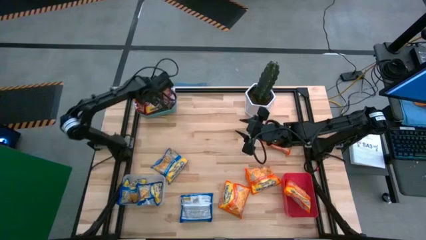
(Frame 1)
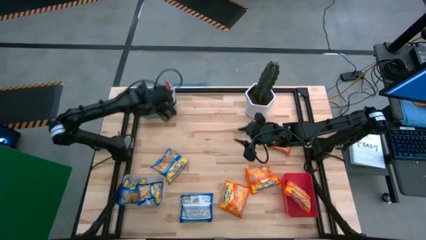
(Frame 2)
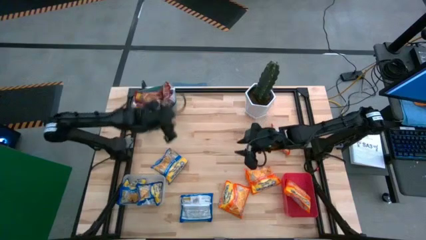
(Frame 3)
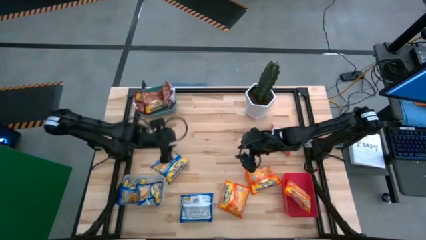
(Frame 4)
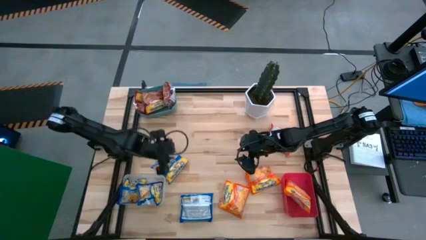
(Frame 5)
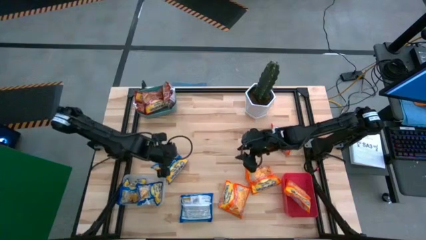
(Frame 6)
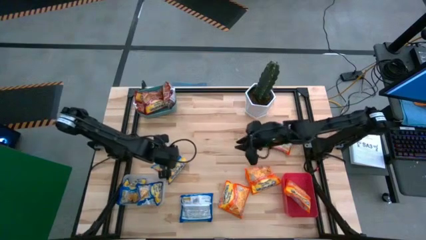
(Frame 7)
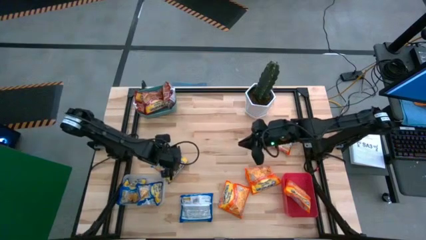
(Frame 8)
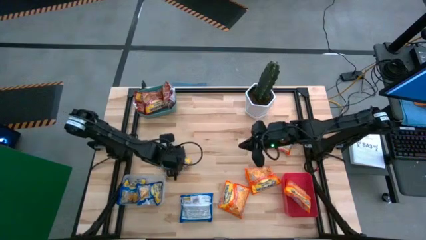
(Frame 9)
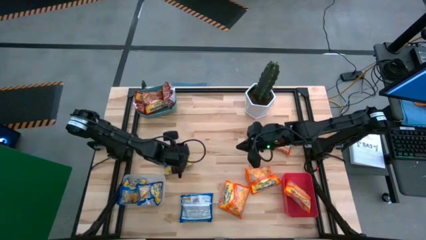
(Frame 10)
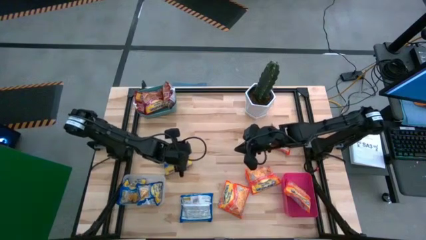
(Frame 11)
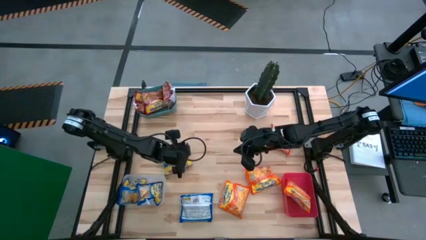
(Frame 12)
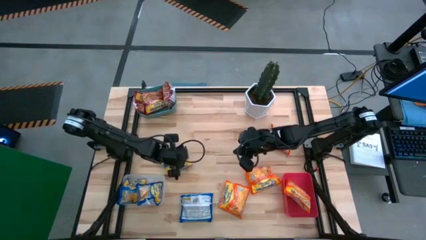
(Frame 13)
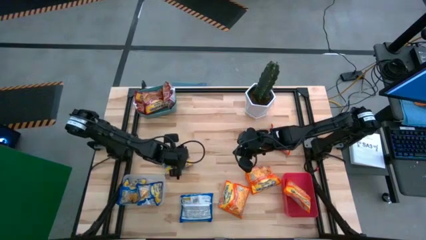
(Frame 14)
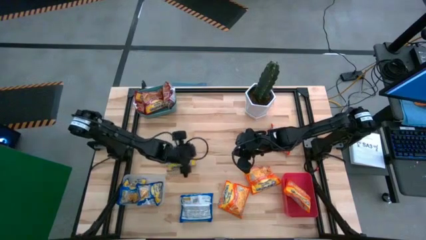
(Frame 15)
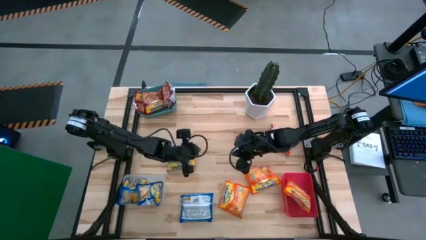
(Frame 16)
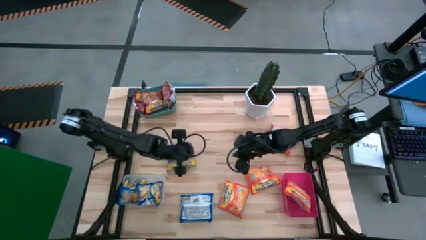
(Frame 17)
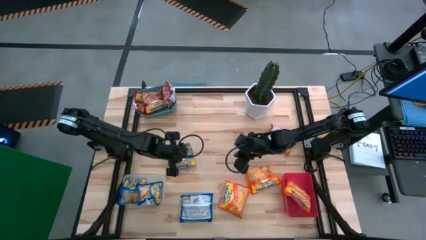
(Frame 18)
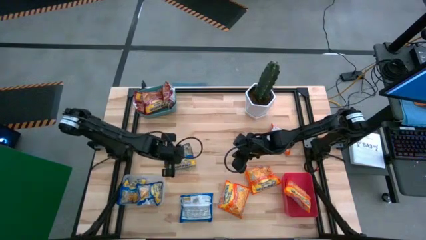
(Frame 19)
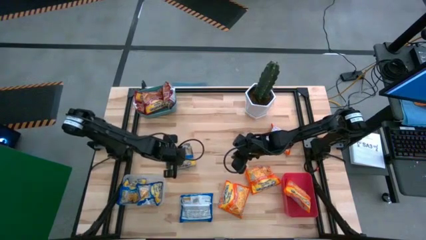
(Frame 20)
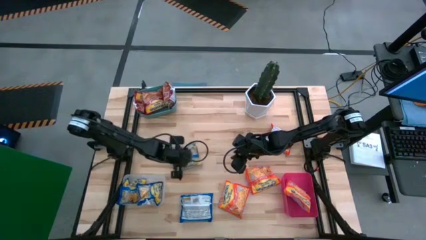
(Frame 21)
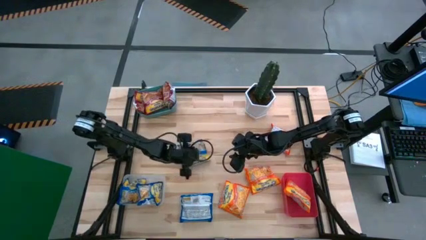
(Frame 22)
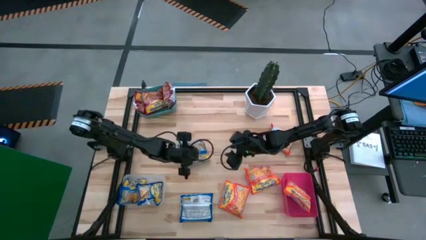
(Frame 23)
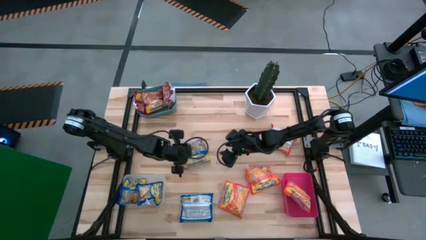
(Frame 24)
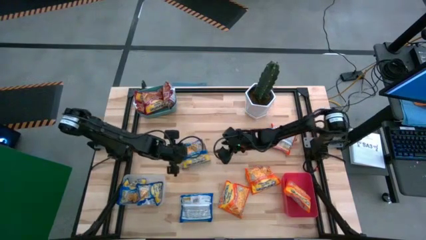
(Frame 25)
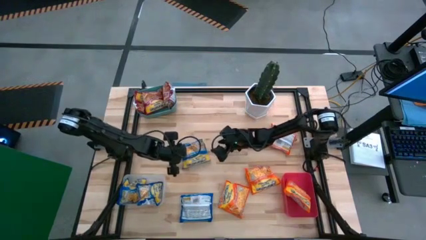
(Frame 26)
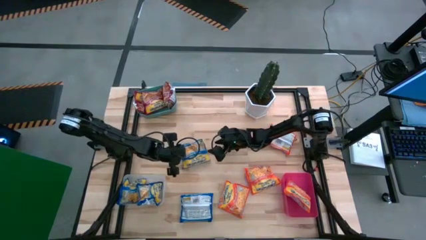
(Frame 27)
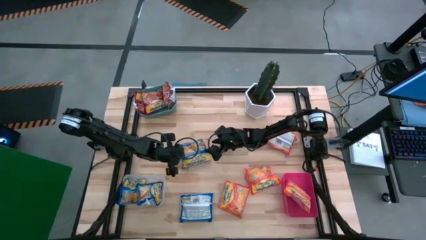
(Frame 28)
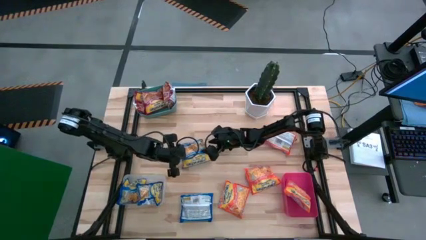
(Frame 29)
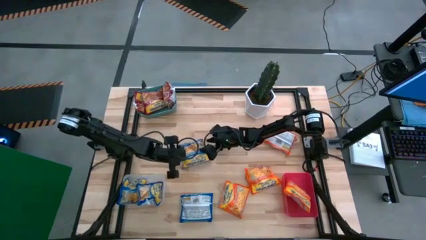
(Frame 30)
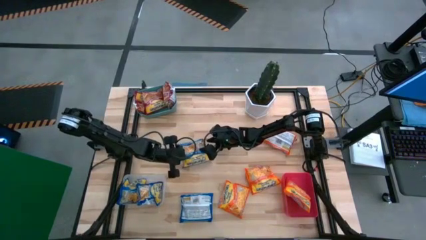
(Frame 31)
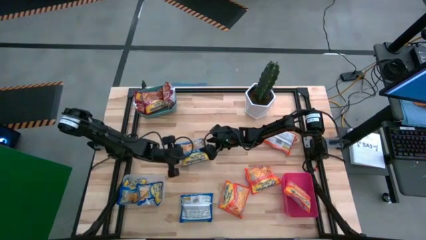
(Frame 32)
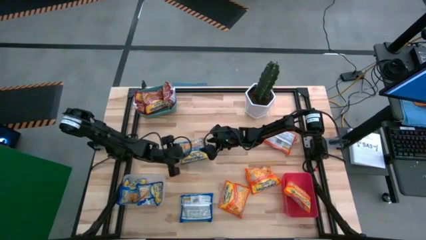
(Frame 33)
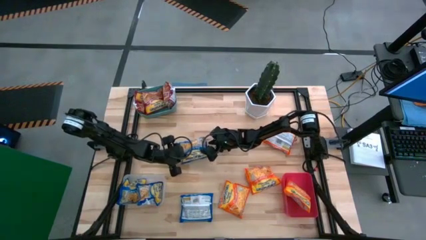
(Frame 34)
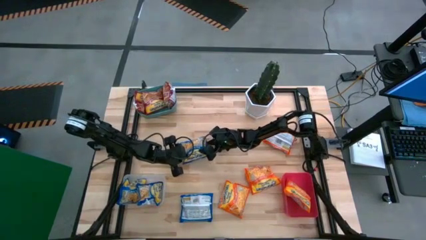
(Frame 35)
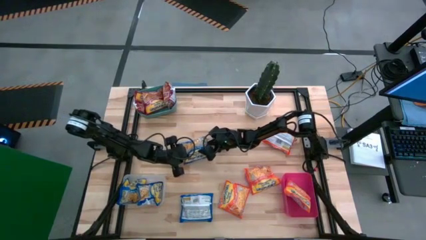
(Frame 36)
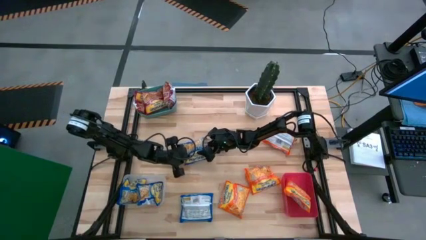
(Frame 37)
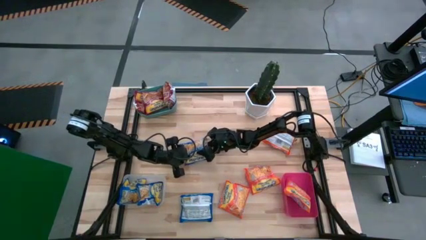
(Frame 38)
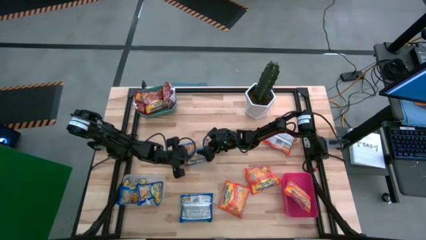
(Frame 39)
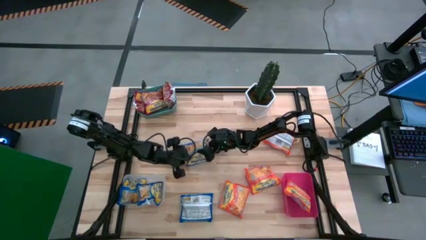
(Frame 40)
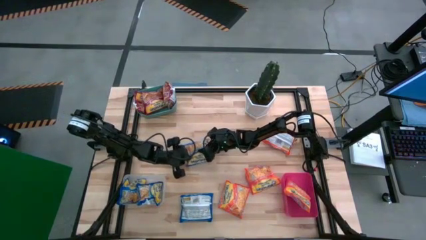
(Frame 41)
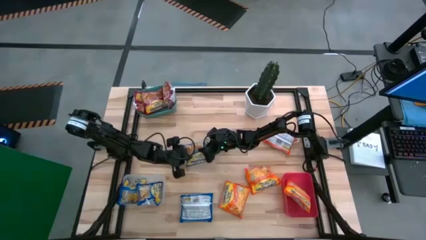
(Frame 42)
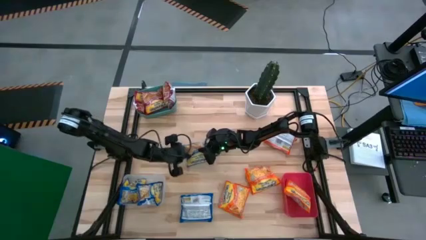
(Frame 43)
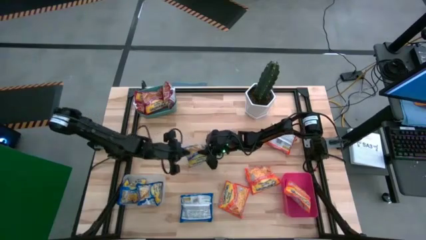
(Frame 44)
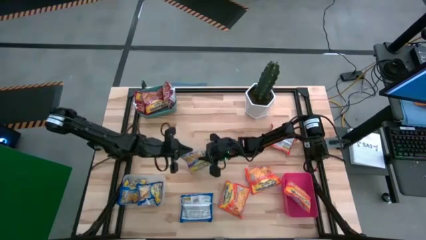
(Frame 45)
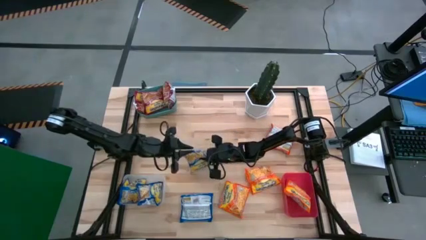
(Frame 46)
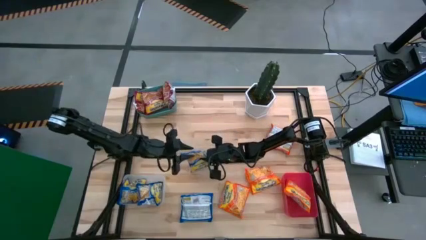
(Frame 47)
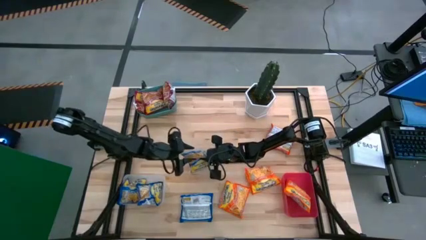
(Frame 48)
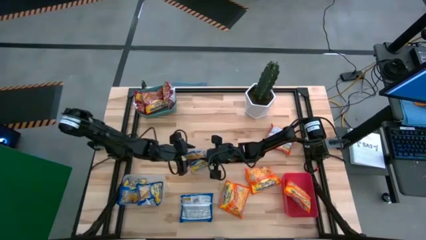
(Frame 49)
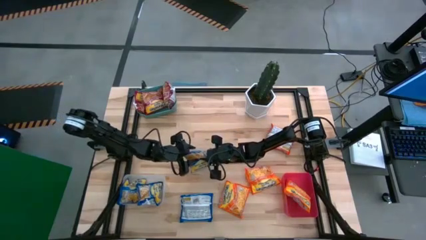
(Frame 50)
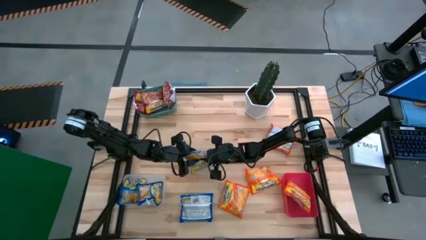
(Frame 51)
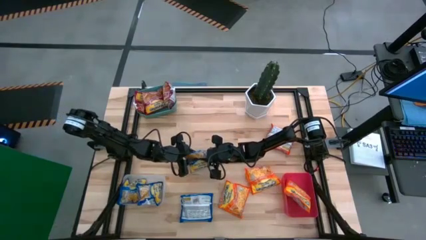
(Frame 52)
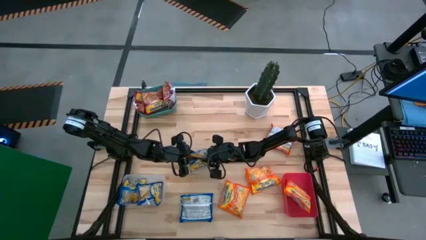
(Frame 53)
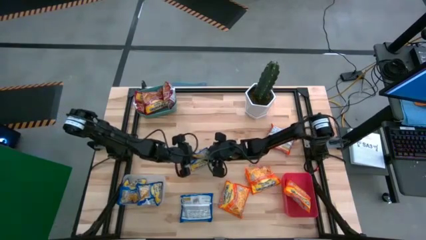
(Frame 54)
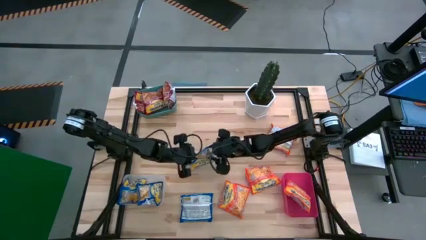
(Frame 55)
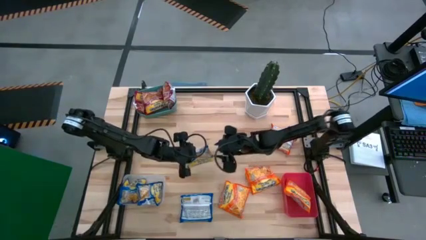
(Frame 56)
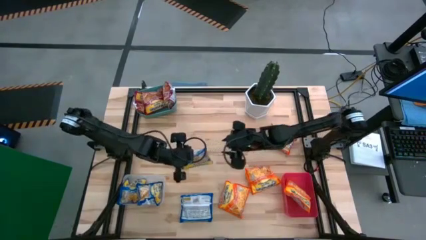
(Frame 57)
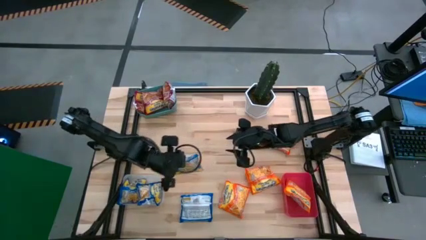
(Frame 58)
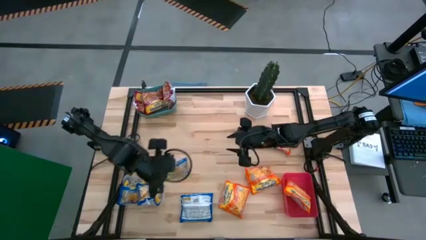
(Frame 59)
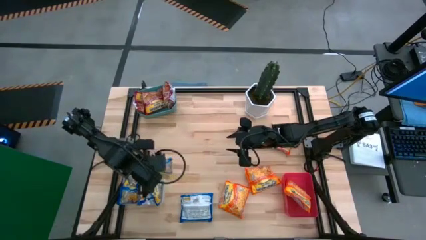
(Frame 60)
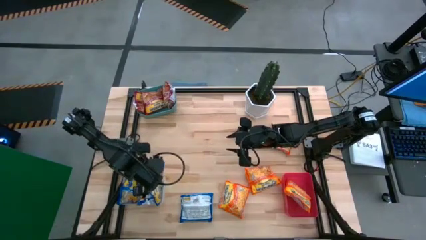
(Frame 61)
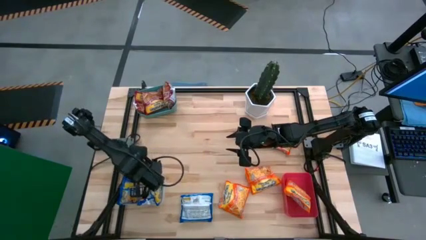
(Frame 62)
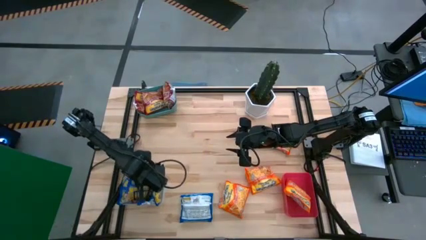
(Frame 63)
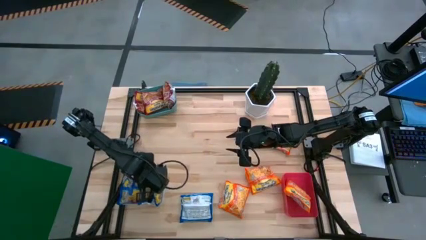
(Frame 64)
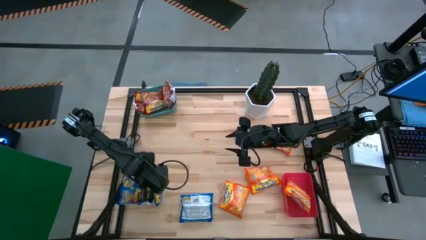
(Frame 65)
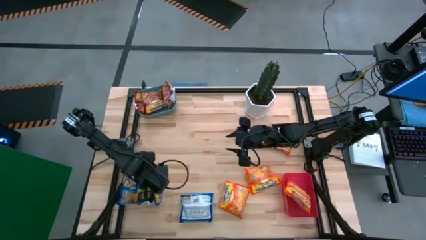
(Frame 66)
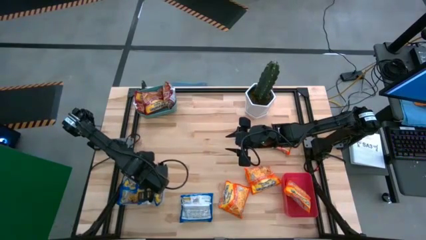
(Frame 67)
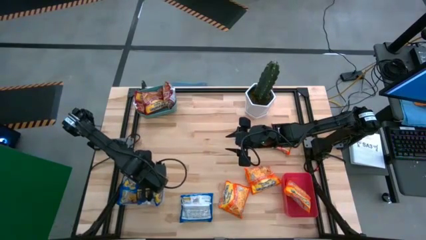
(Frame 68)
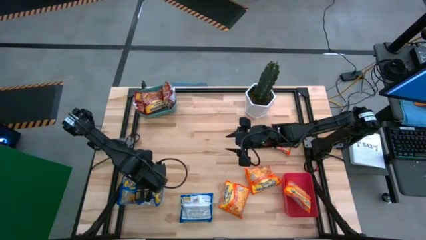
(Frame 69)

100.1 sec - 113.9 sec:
Task: Sort Maruchan noodles
Put the top blue noodle into the transparent bin

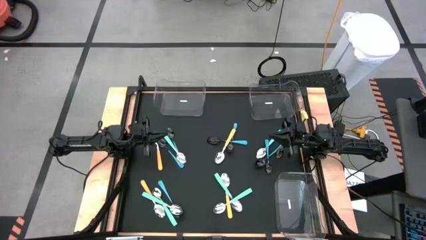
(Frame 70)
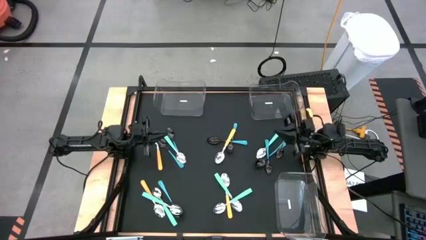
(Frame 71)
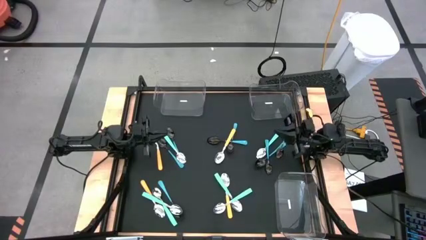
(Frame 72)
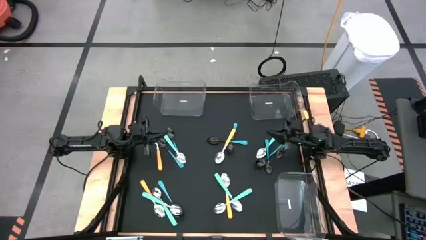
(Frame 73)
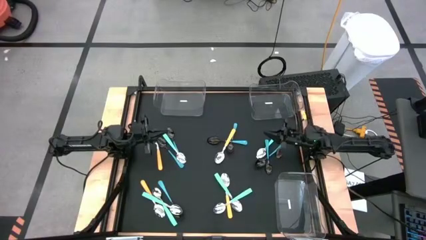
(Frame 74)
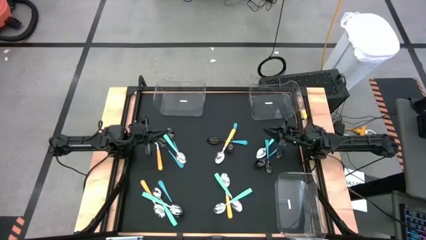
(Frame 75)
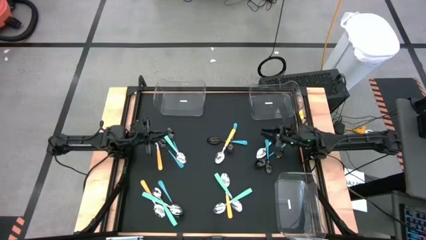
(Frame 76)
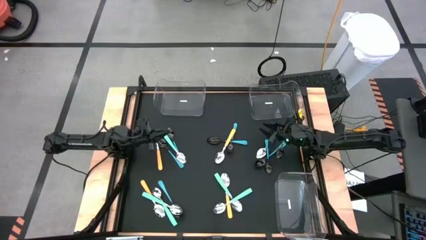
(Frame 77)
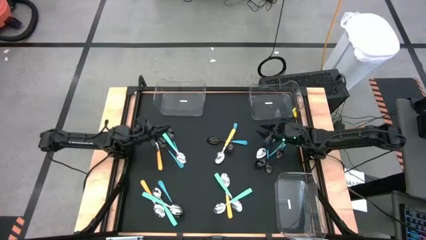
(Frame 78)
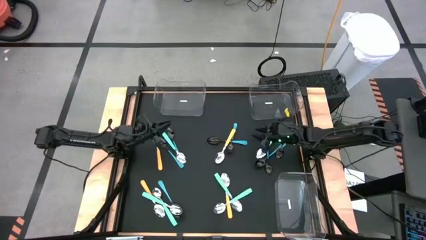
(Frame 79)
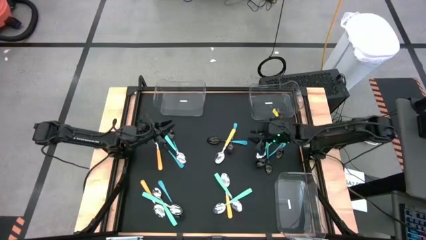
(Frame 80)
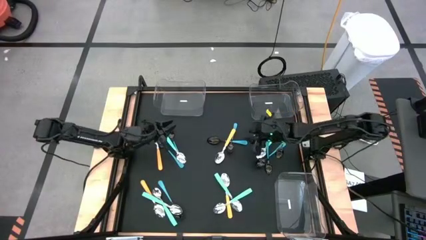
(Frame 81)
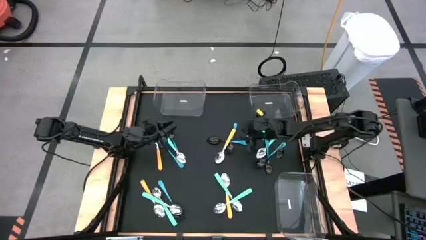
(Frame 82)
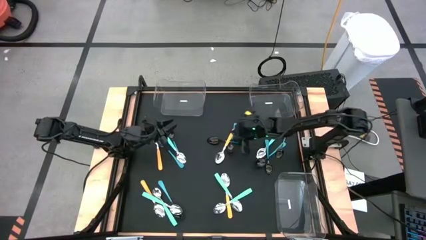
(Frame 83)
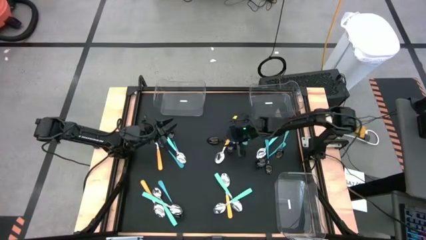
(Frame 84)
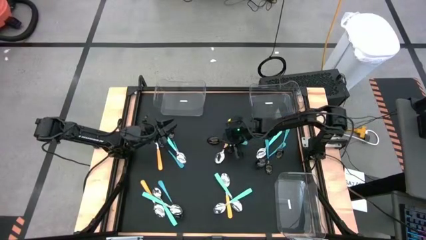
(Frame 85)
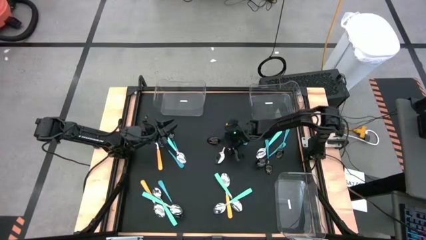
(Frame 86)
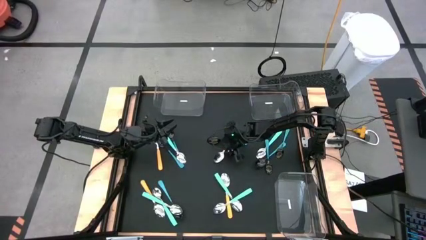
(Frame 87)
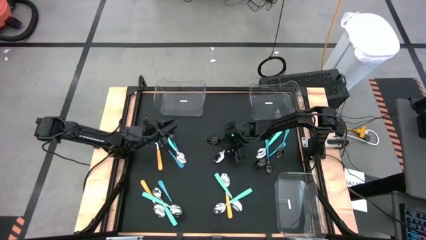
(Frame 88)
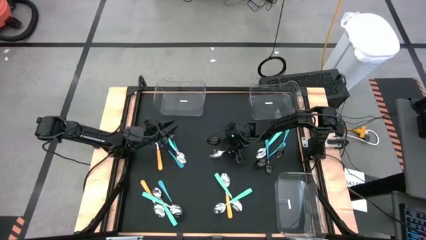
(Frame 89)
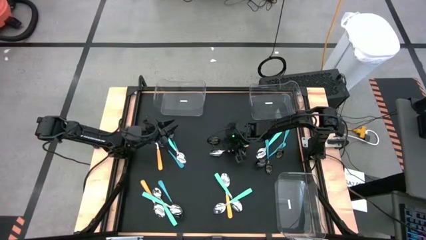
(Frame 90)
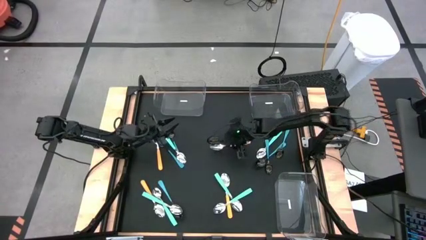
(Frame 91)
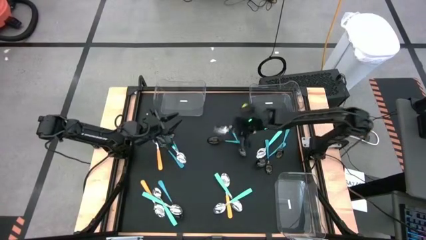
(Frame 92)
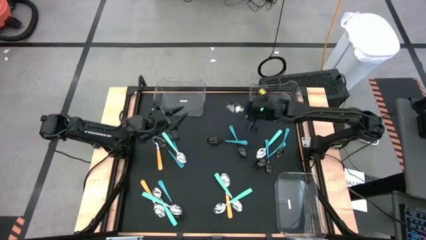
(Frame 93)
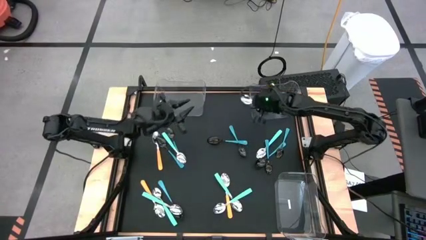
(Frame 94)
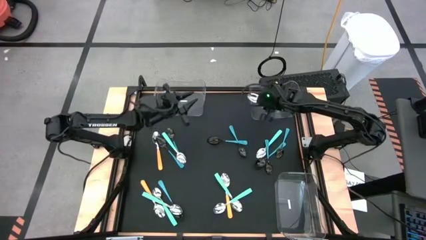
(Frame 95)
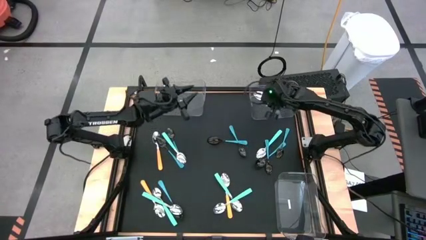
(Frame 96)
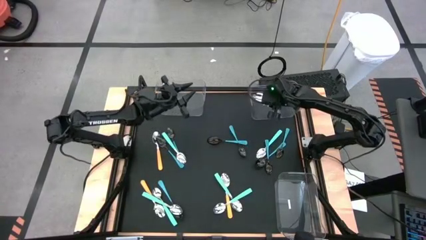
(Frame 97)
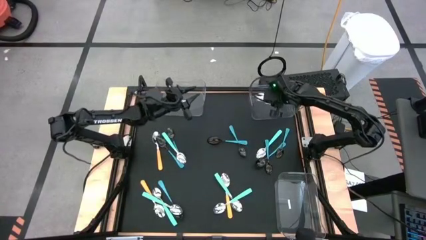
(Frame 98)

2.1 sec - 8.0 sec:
Task: Sort silverware by color (type)
Put the yellow spoon into the top right transparent bin
